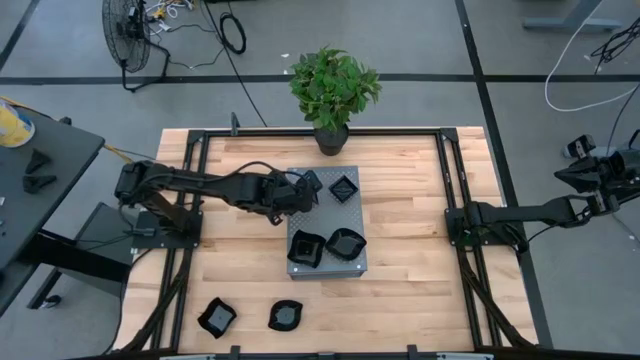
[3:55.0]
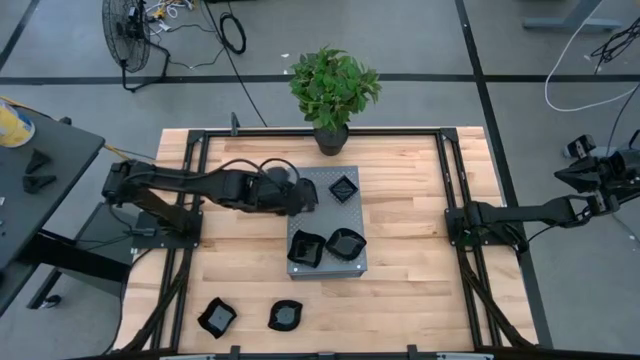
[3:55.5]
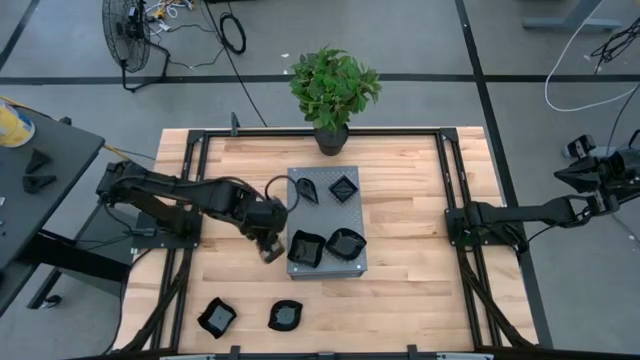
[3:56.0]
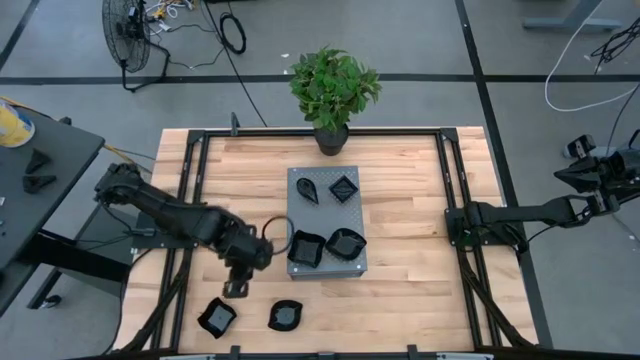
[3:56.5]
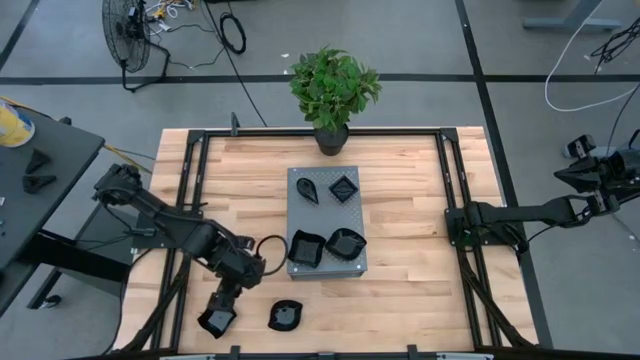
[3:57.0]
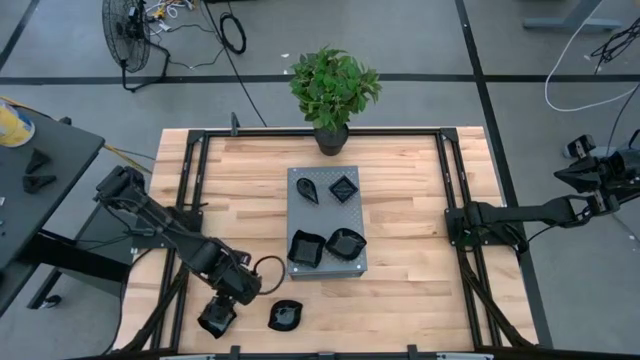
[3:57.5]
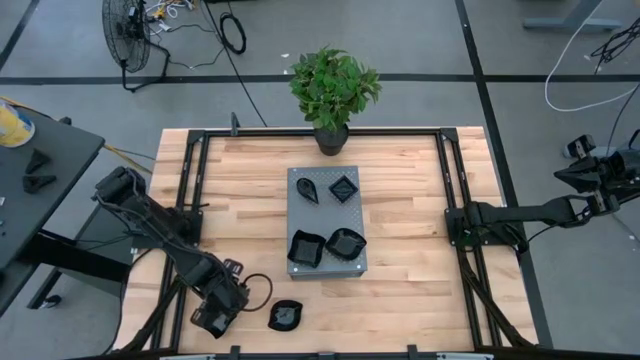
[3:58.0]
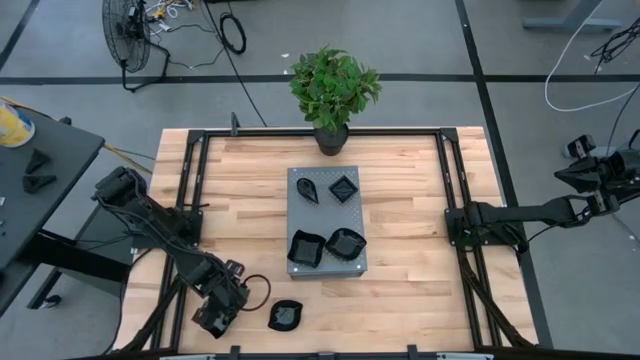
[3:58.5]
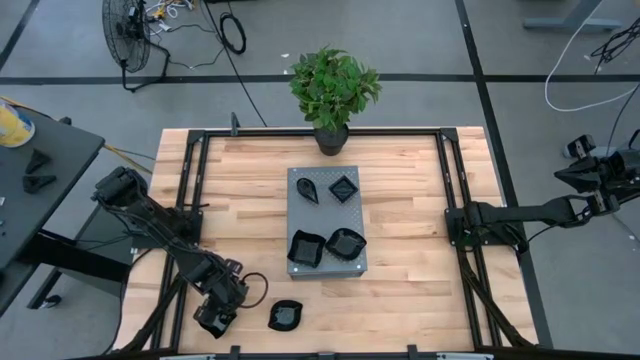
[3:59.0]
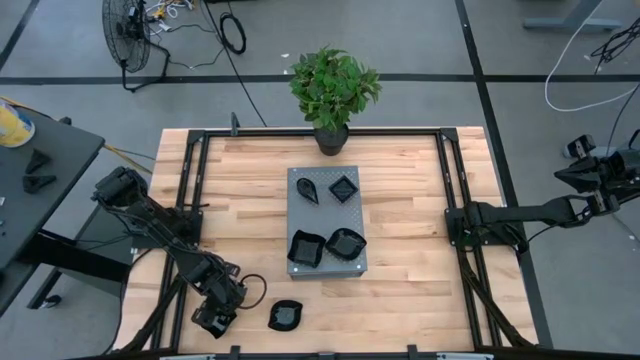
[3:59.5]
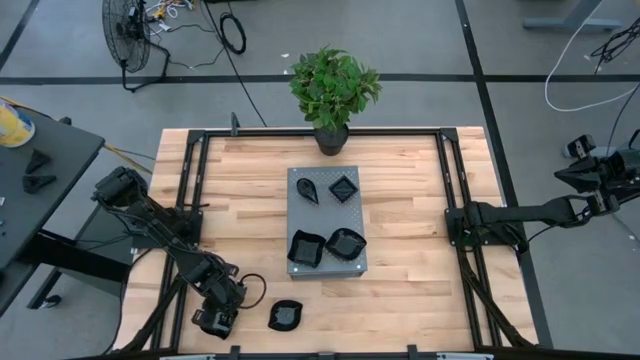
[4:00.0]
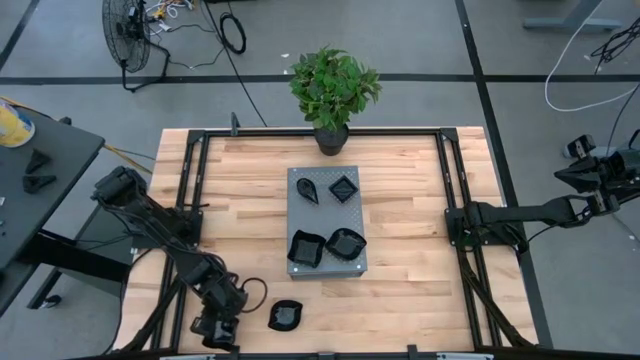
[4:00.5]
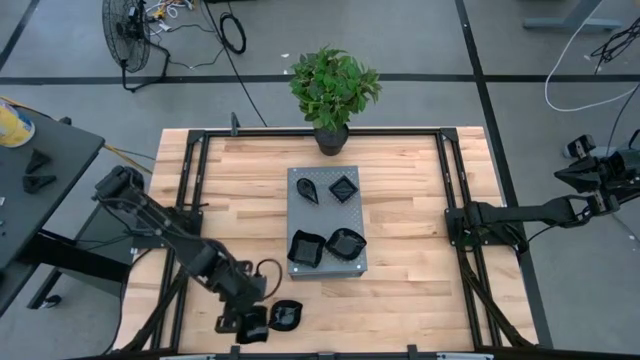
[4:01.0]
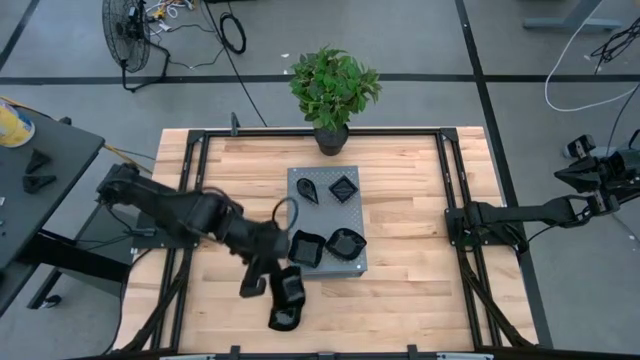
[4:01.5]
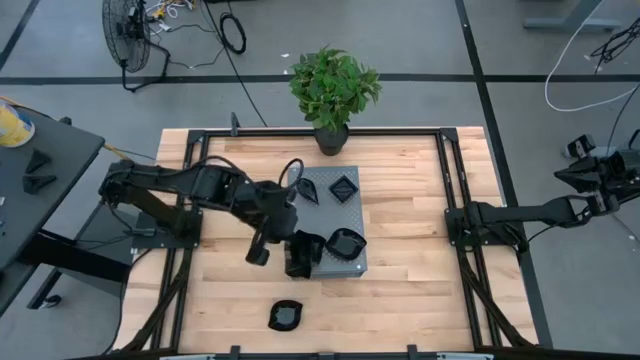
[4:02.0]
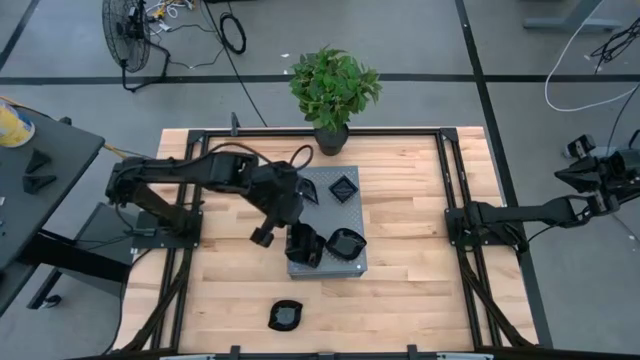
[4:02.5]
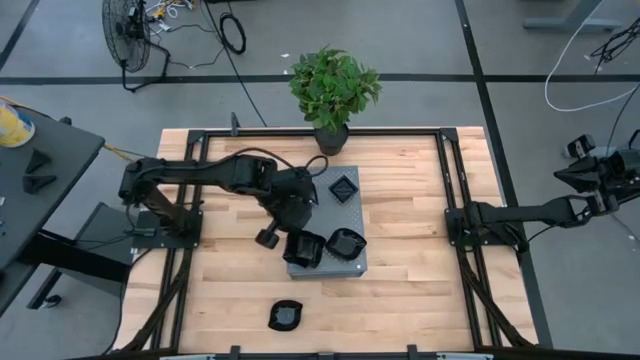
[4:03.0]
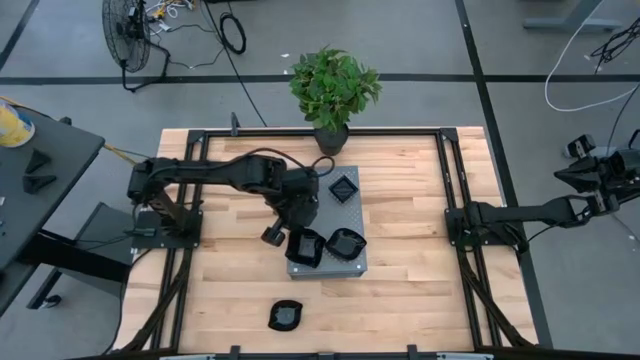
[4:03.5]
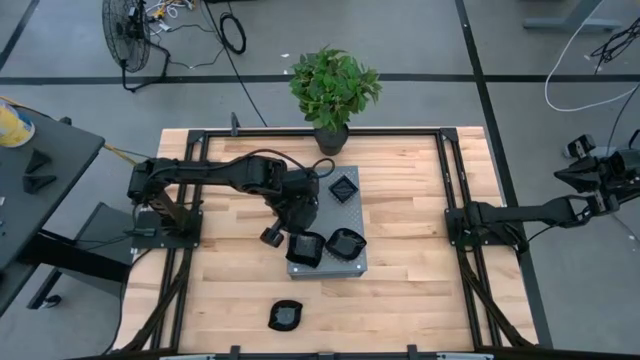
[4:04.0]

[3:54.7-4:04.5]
Task: Pick & Place Mini shaped plates
Stack the black bowl on top of the black bowl on the shelf

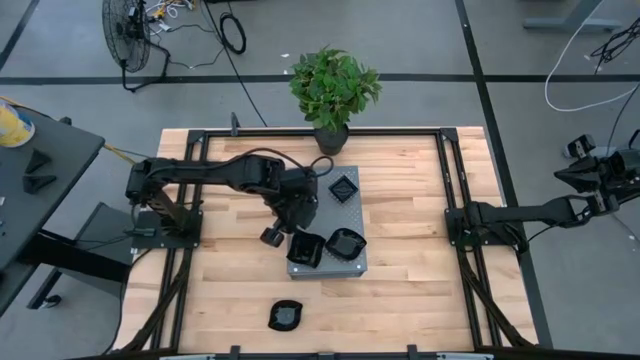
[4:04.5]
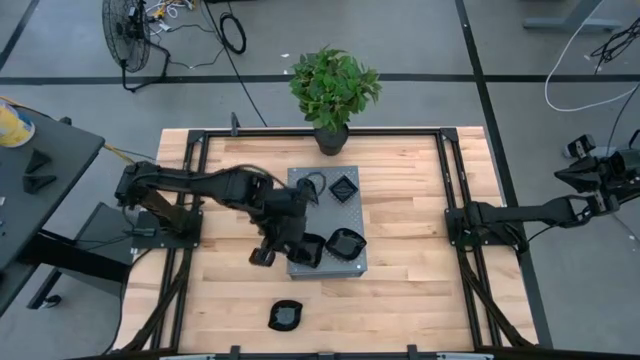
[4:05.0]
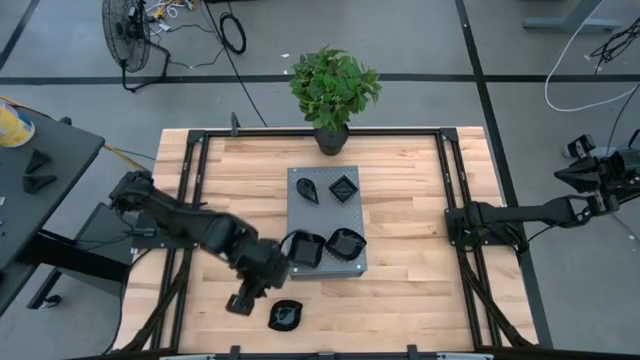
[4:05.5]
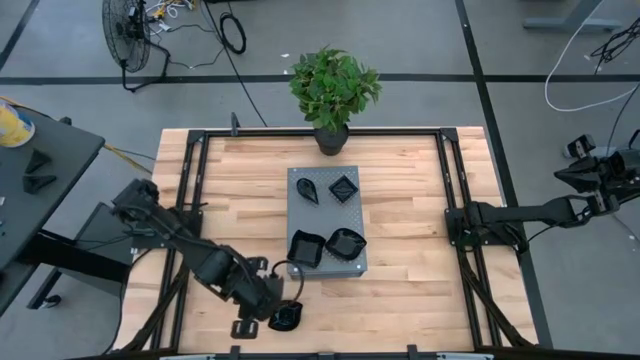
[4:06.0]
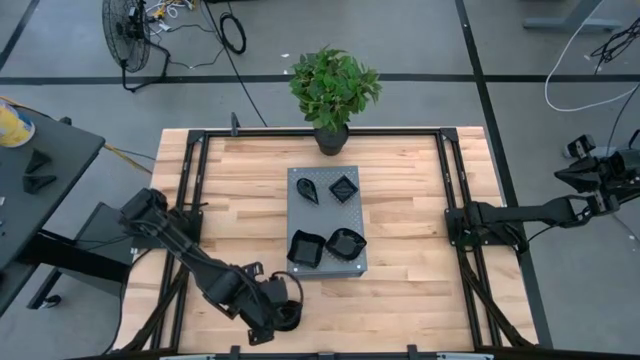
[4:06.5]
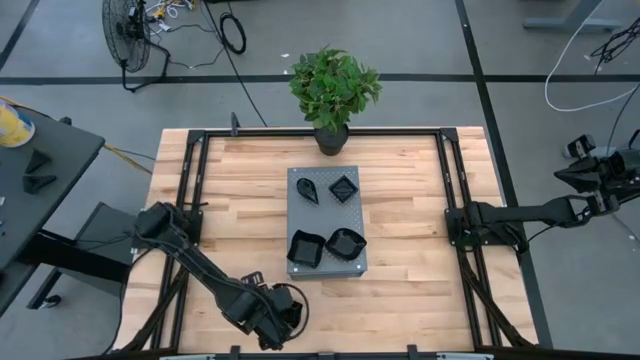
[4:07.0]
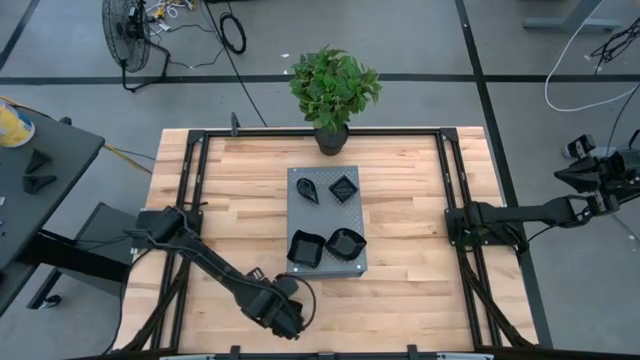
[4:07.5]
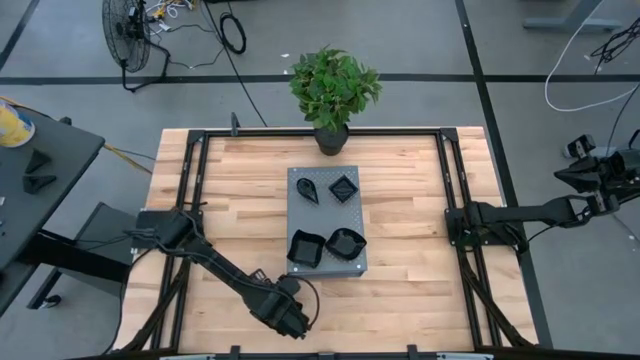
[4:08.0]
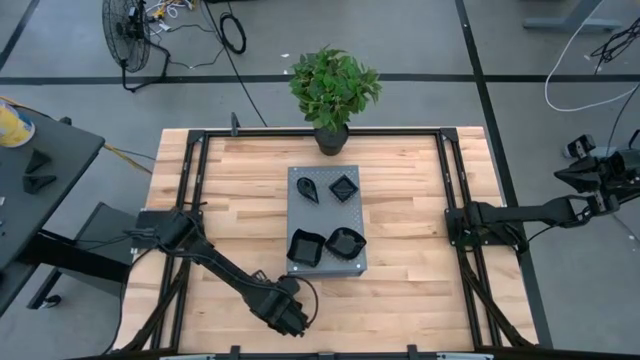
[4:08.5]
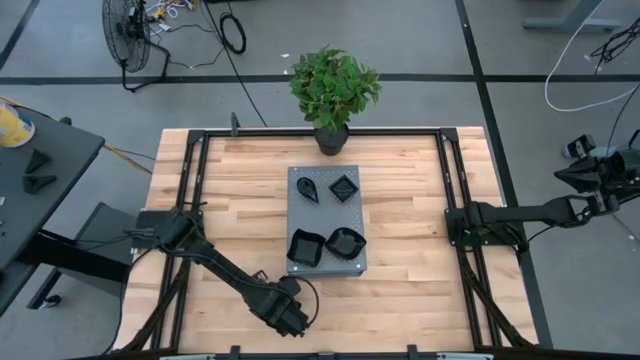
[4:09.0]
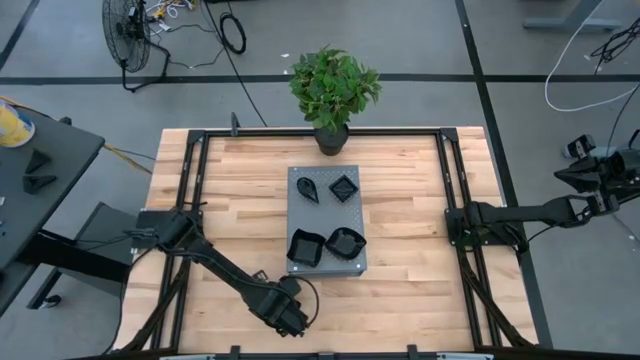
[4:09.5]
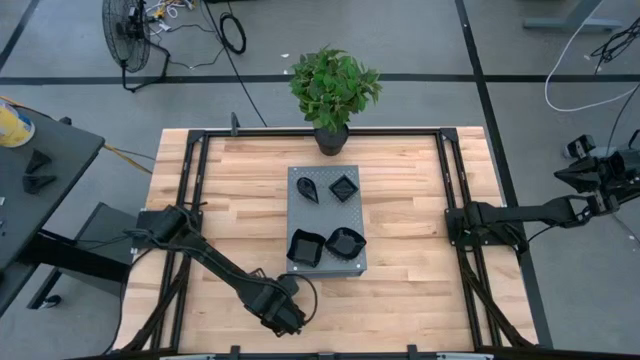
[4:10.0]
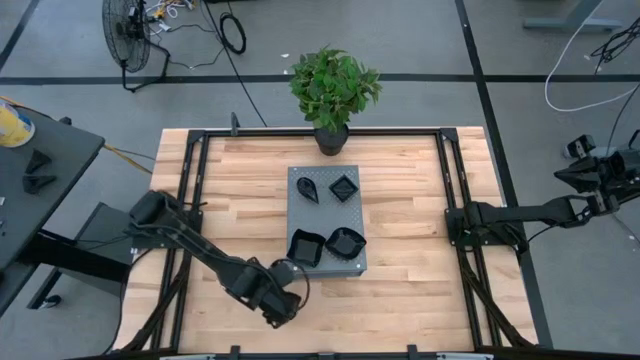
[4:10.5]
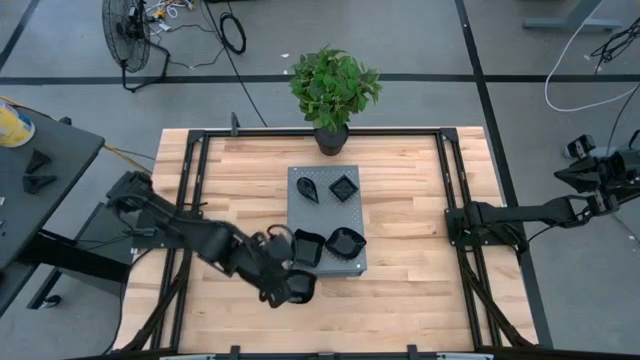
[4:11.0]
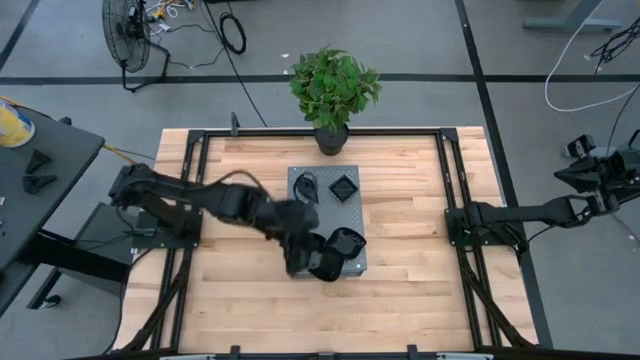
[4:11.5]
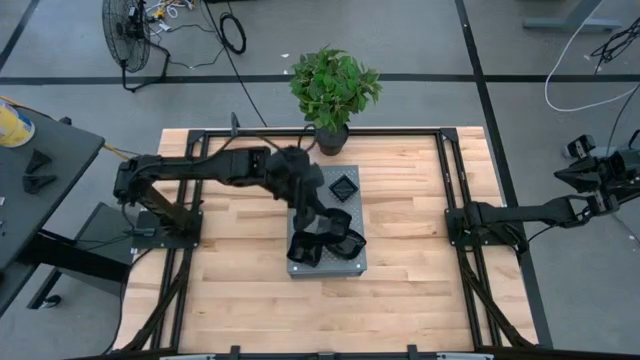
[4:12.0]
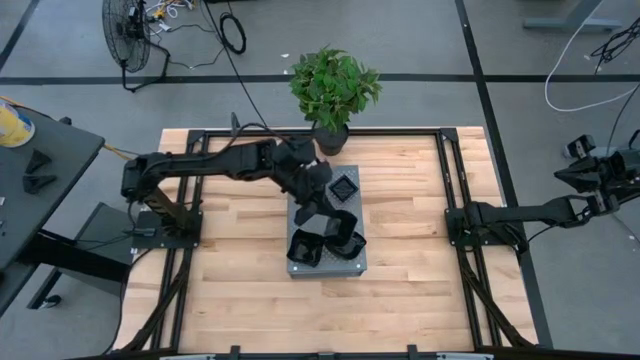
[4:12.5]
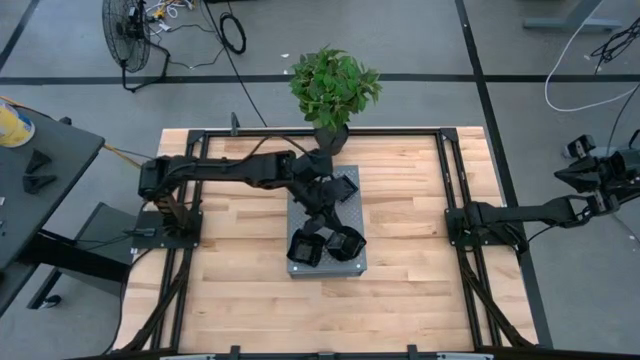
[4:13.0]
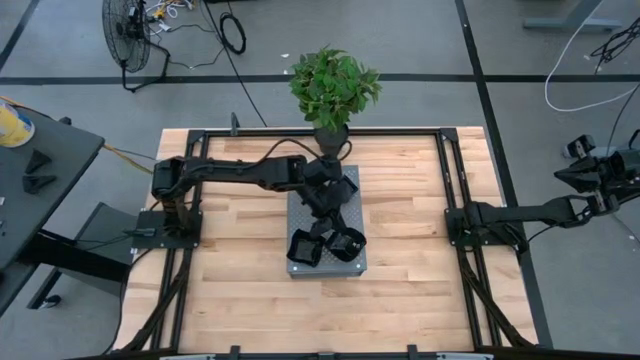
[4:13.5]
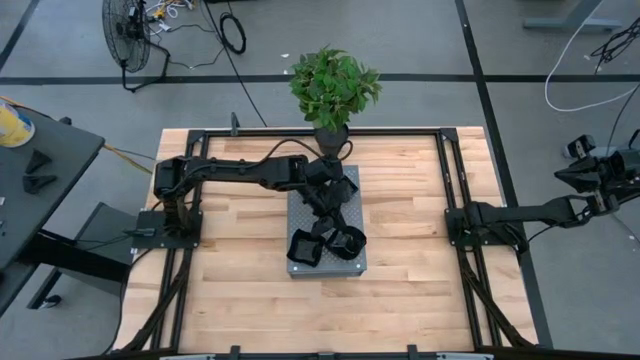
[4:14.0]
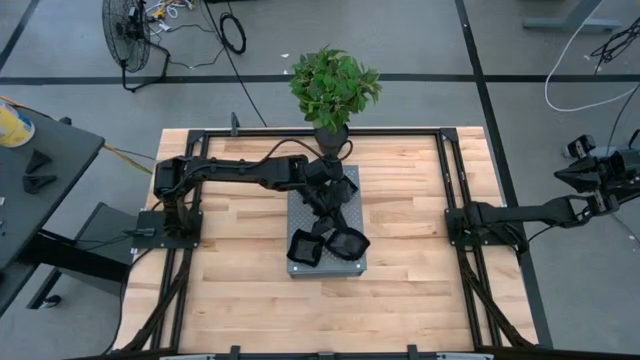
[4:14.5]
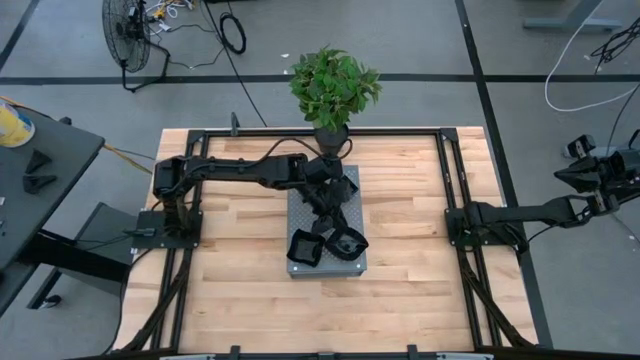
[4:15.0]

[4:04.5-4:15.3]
Stack the black bowl on top of the black bowl on the shelf

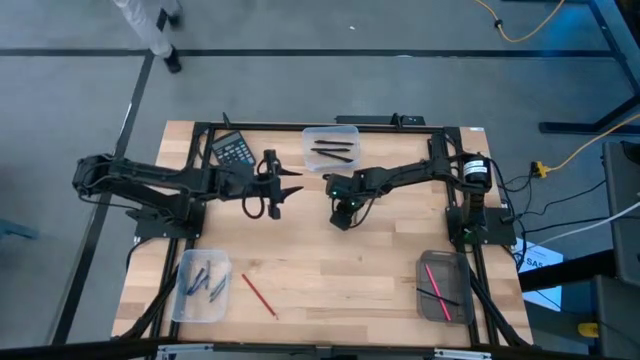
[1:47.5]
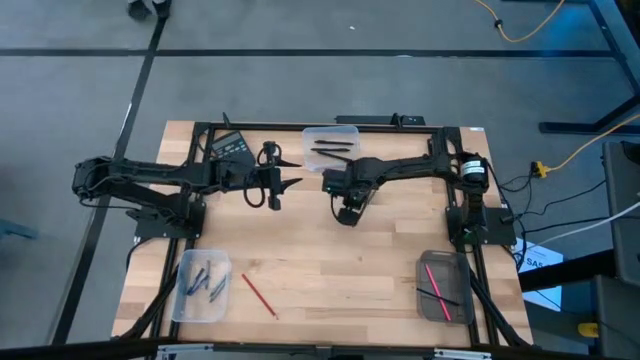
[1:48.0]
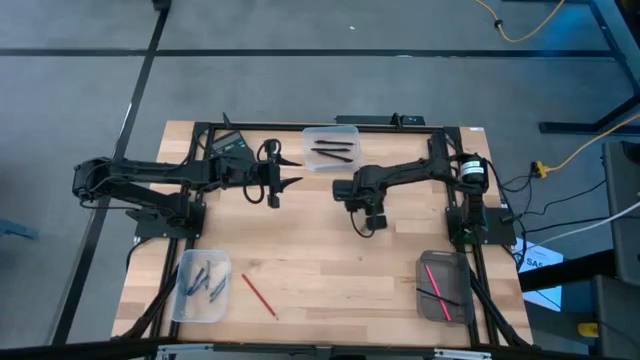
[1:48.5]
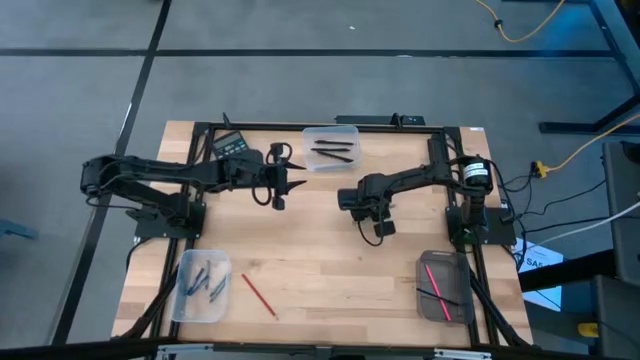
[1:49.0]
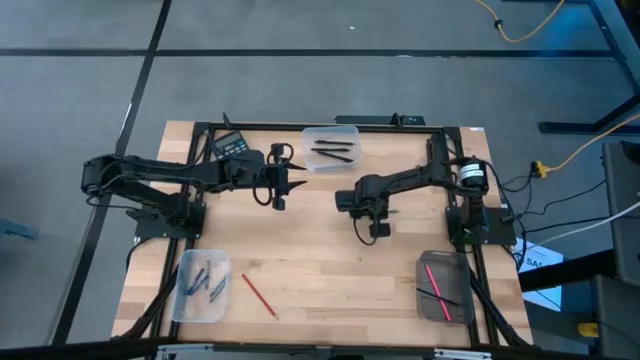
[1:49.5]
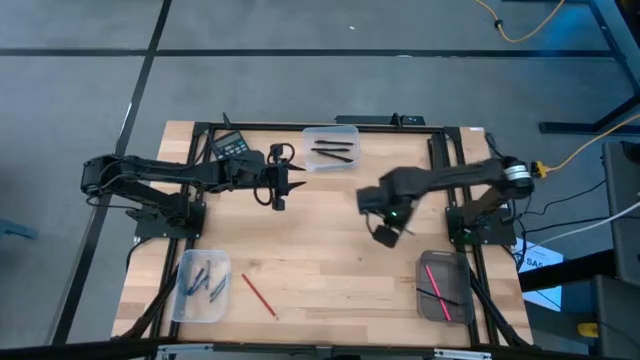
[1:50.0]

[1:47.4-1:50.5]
Task: Sort crayons/erasers/pens/pencils in bins
Put the green color pencil into the black bin
